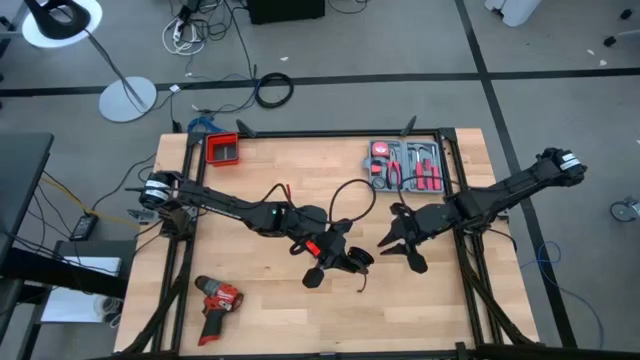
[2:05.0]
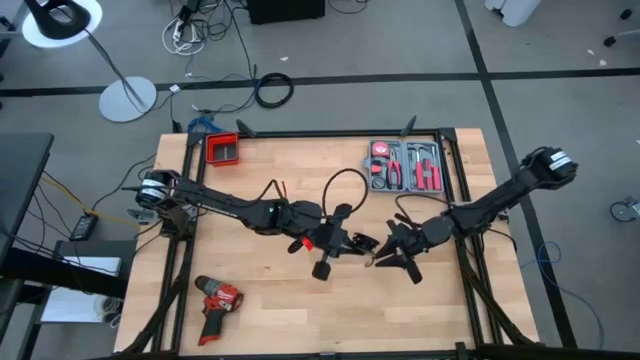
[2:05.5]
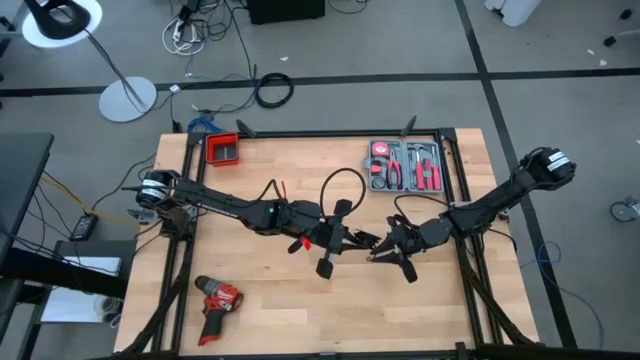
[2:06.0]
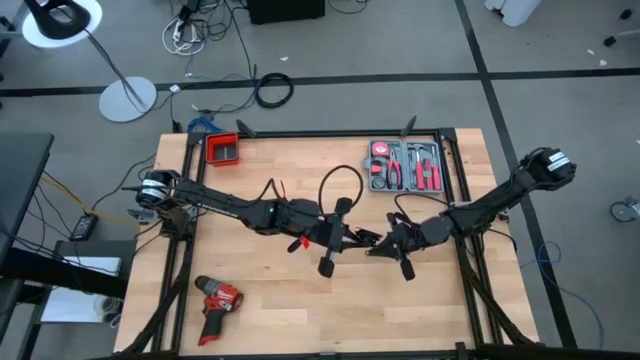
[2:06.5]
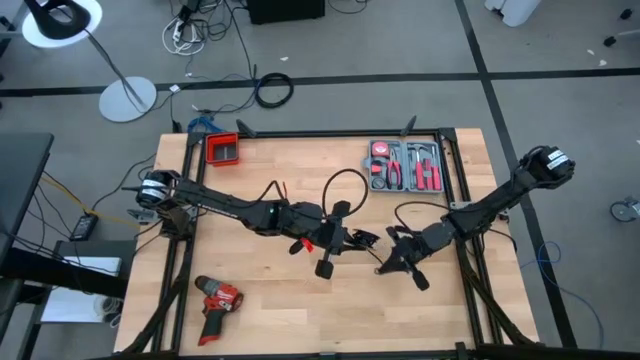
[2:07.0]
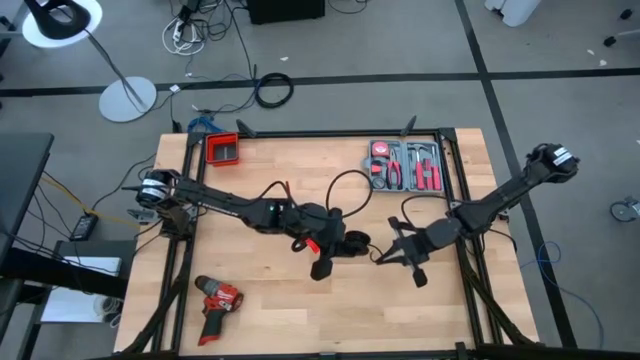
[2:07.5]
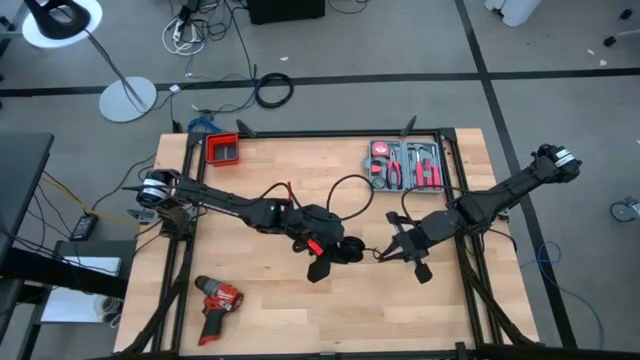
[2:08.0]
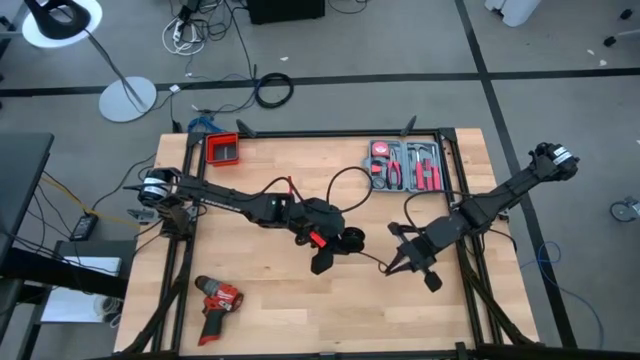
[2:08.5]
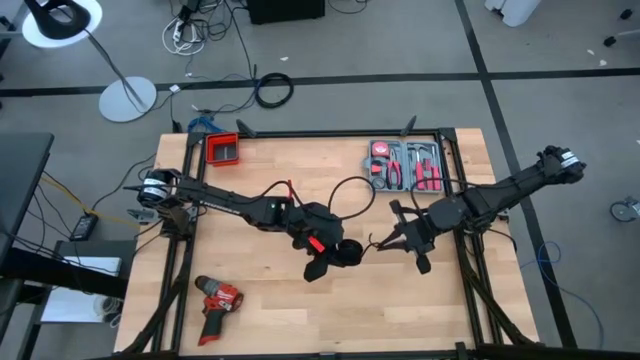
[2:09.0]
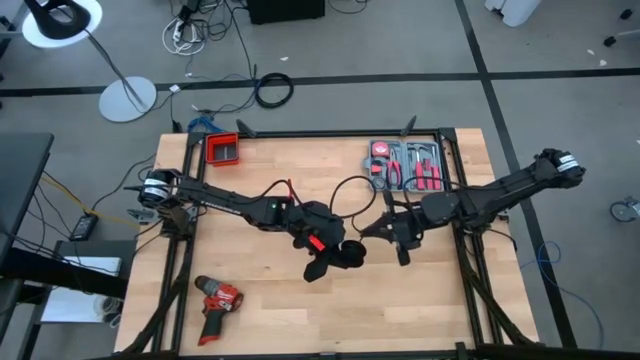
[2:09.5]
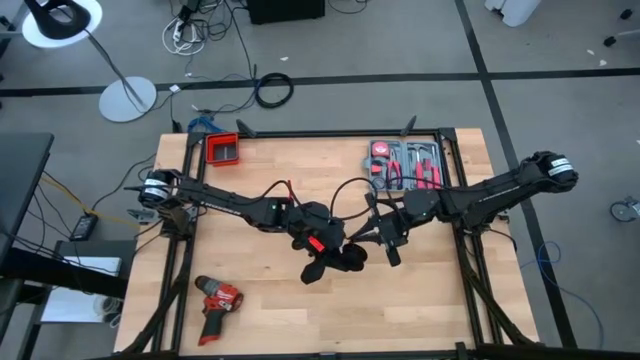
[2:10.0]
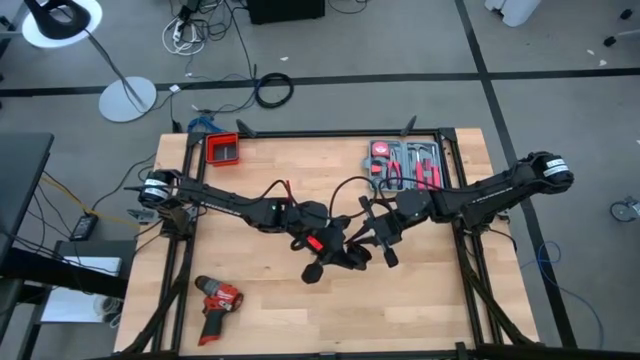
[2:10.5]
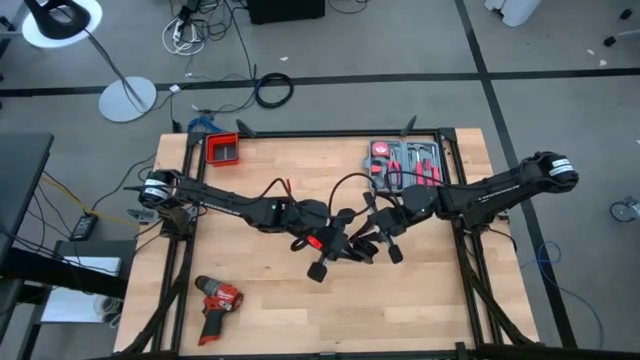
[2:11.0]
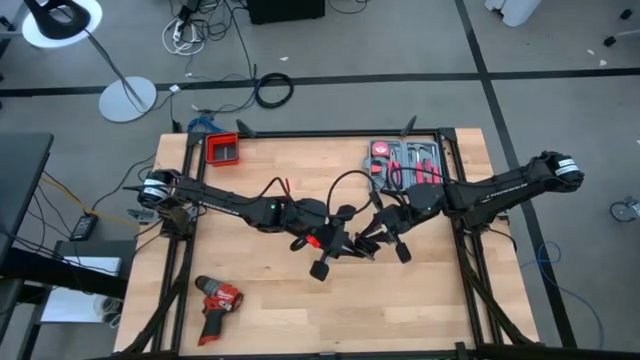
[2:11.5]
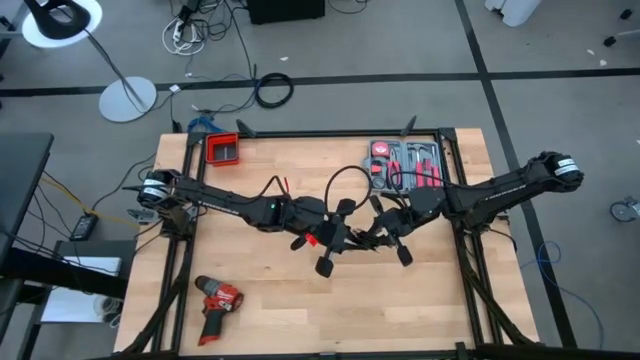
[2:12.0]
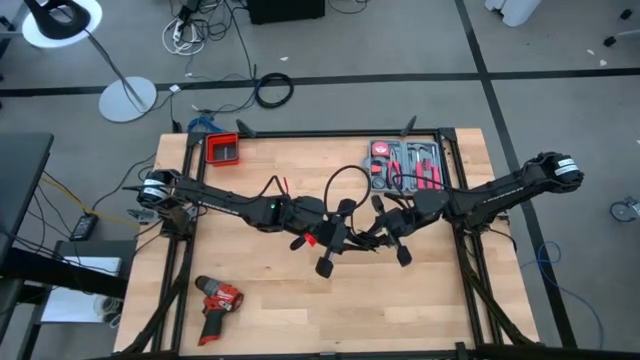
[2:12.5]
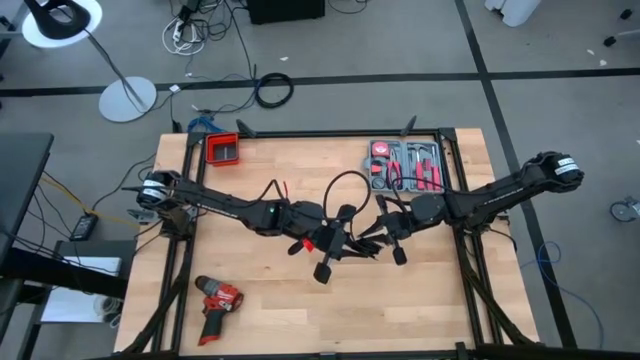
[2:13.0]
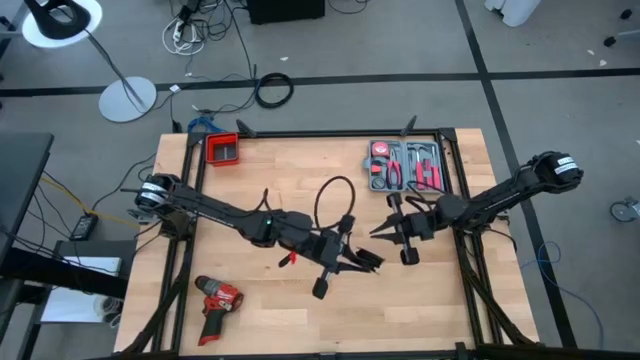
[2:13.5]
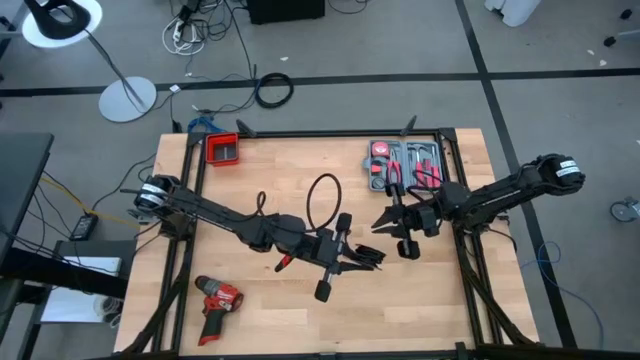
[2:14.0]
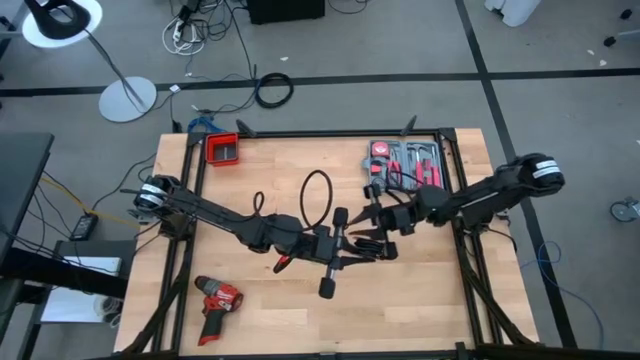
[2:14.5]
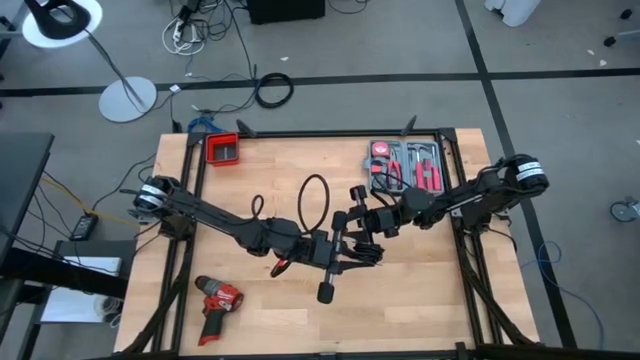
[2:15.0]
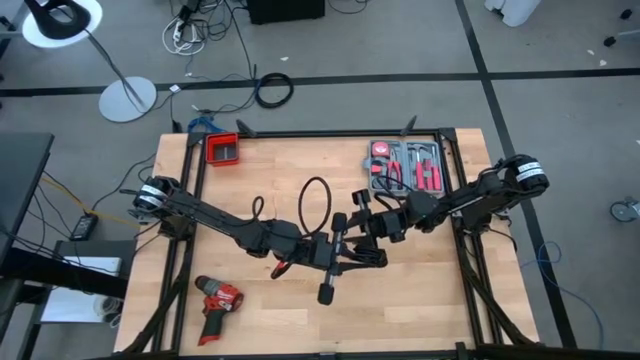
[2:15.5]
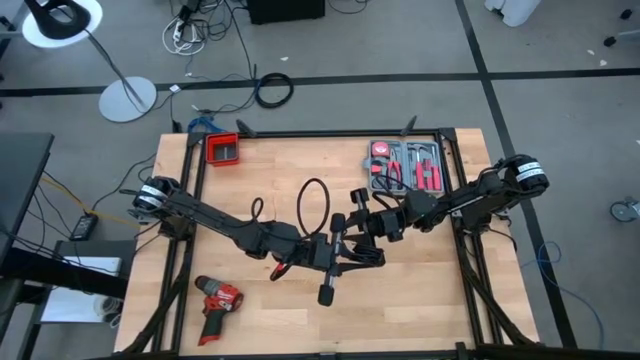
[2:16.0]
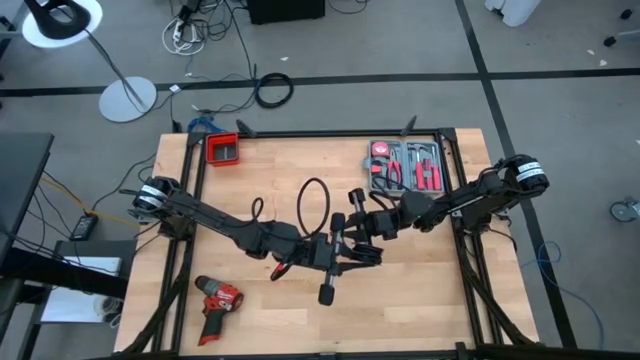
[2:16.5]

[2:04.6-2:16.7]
Task: Coil cords
Coil the black wire onto the black spool

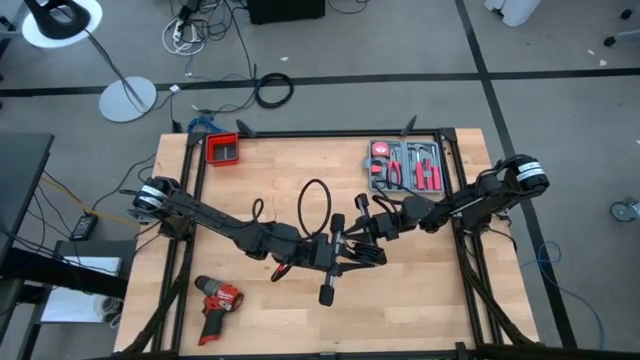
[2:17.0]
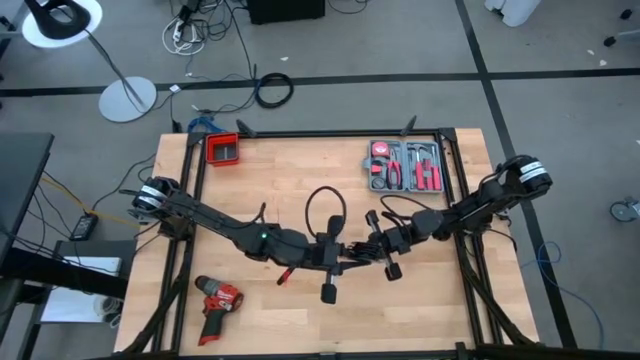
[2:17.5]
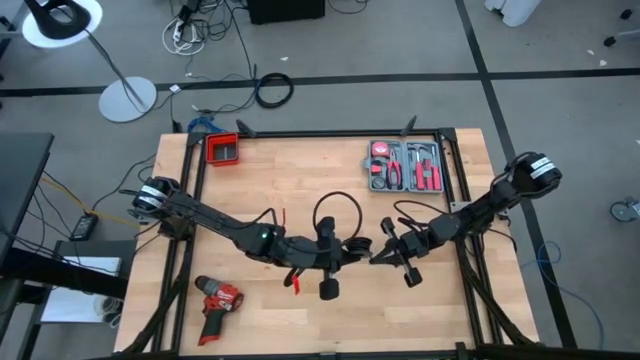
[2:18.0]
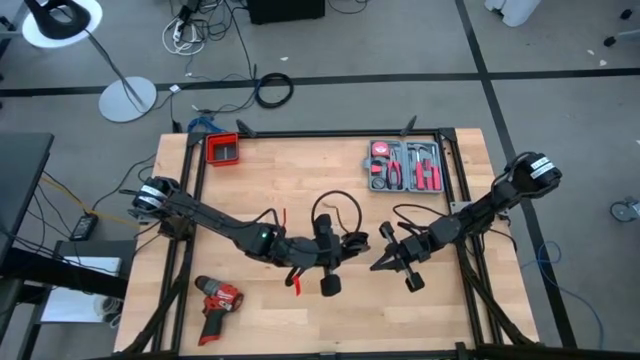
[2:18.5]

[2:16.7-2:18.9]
Coil the black wire onto the black spool

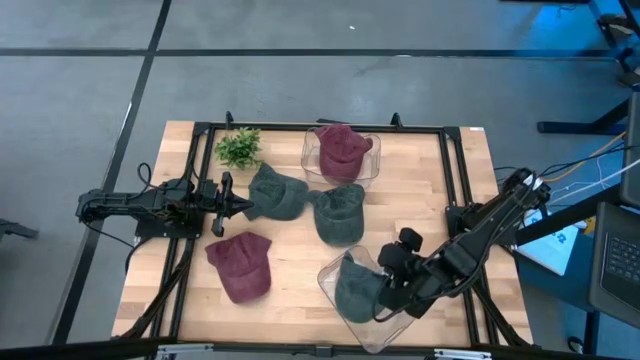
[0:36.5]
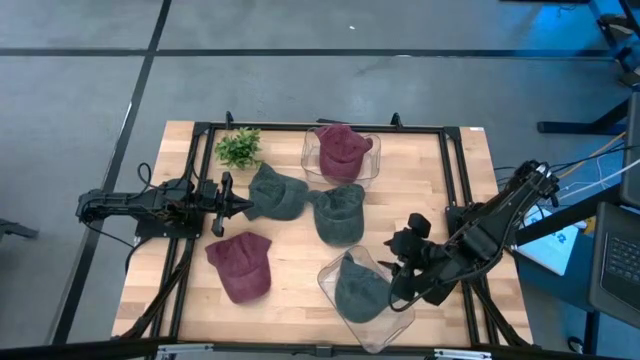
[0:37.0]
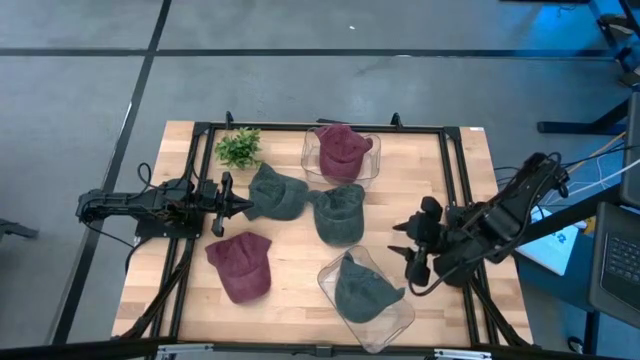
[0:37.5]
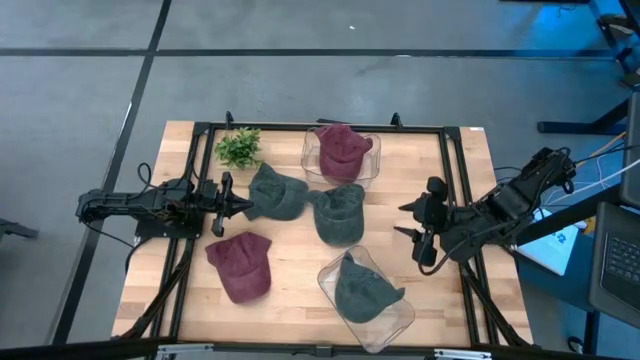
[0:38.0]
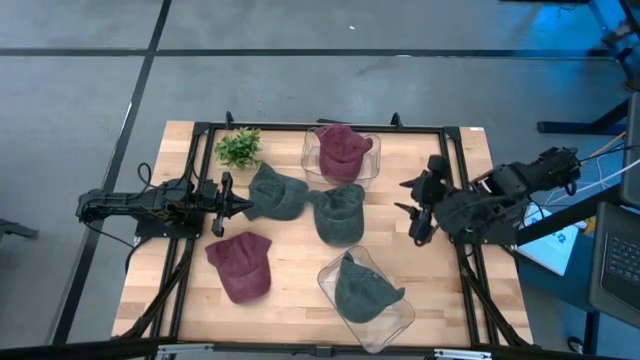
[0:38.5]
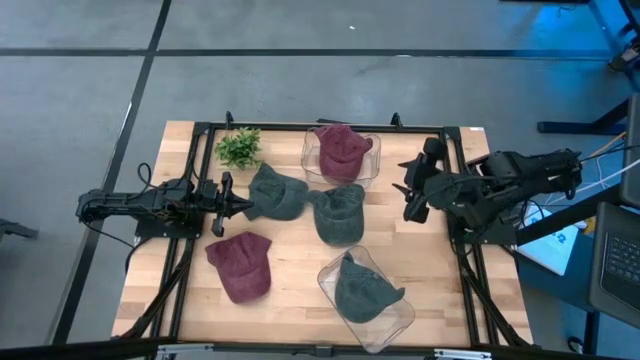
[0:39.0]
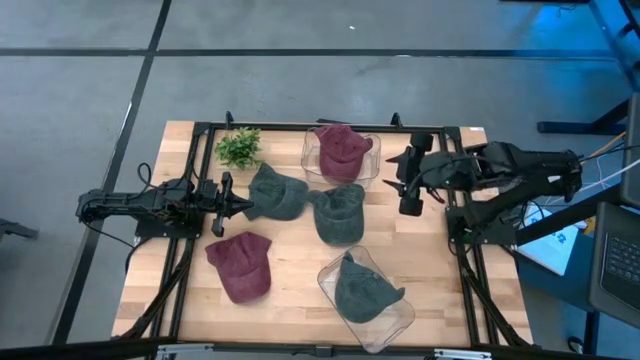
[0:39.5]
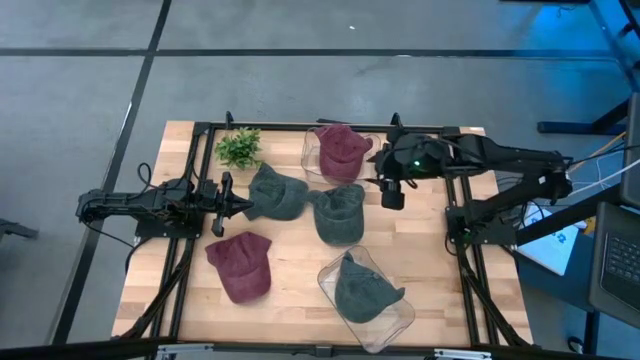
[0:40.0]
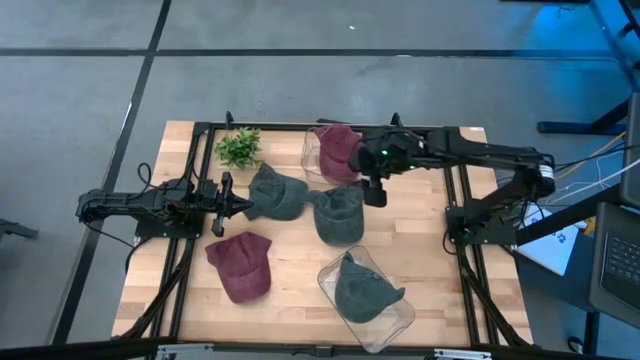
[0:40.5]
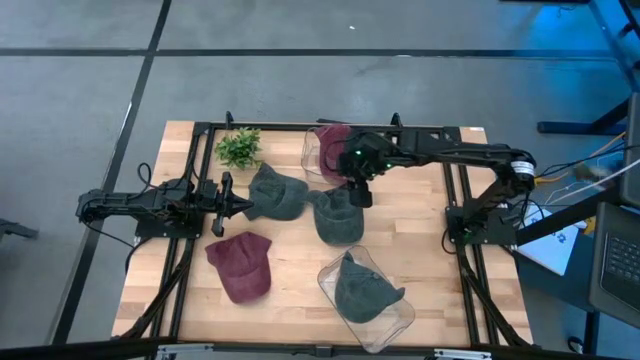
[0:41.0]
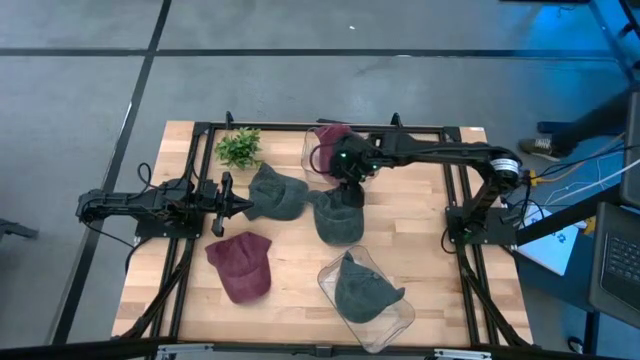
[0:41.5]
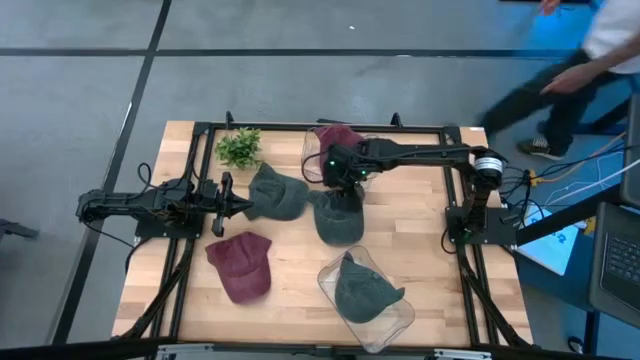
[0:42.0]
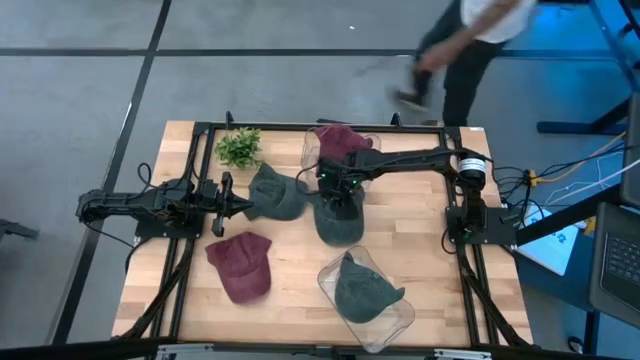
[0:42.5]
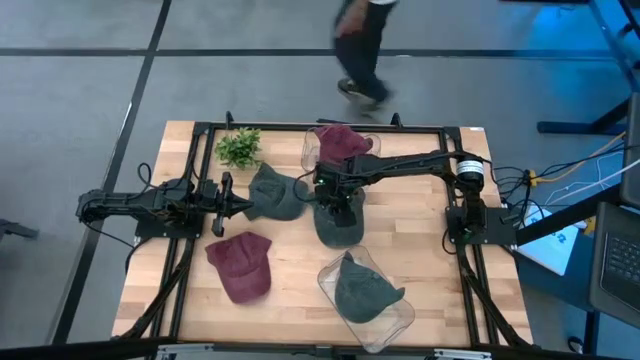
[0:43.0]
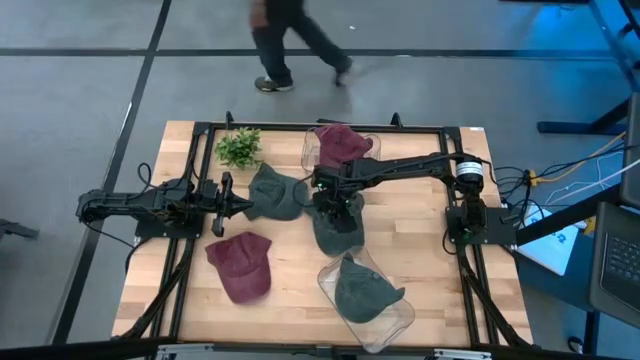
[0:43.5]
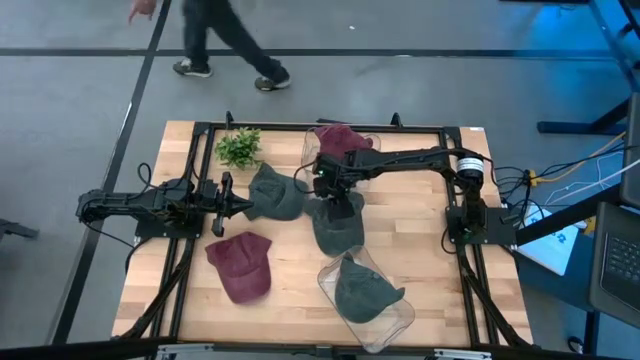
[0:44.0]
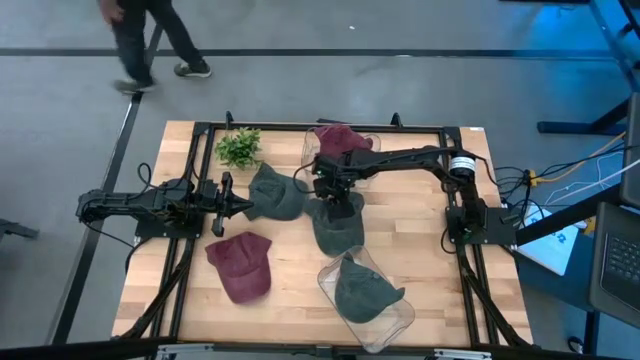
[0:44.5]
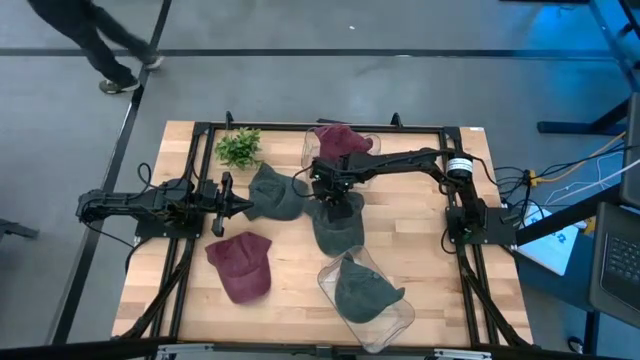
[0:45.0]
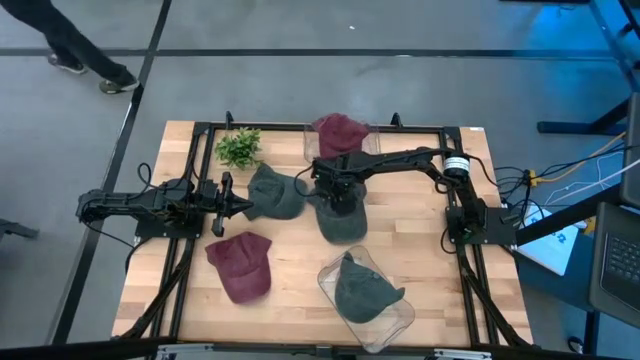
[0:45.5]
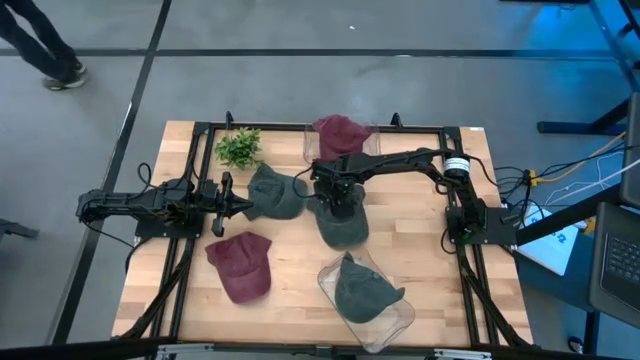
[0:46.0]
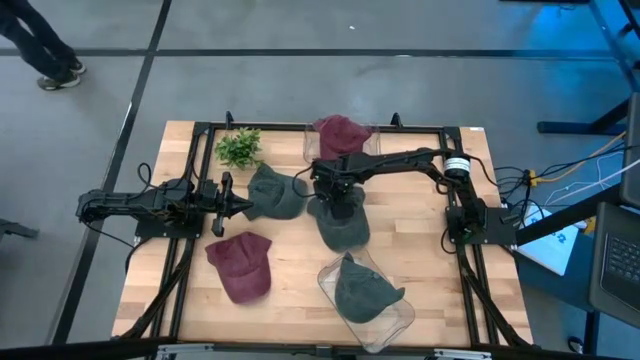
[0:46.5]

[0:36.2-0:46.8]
Task: Pick & Place hat
Put the right black cap into the bottom transparent bin
